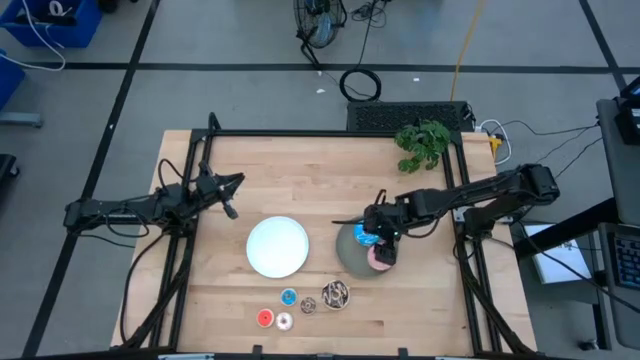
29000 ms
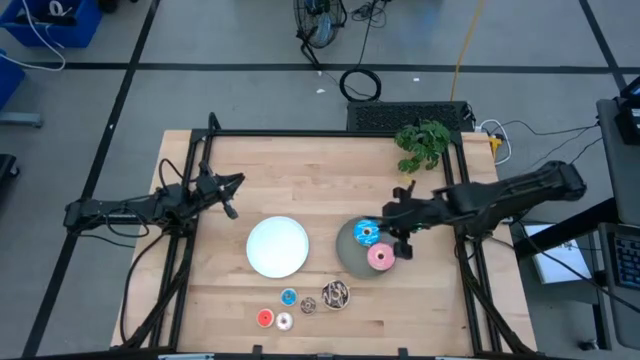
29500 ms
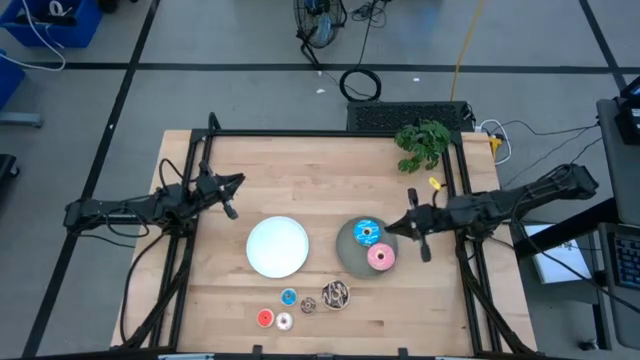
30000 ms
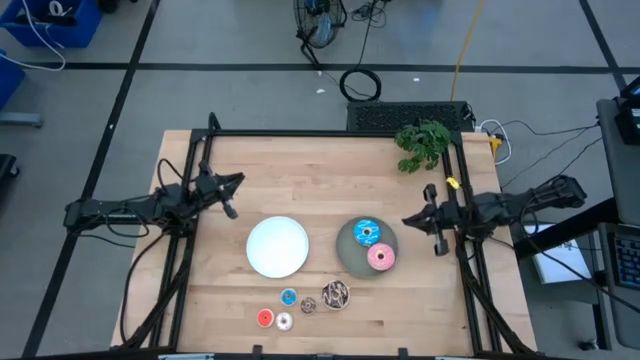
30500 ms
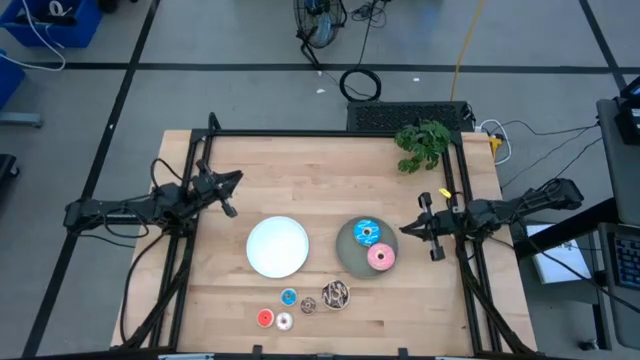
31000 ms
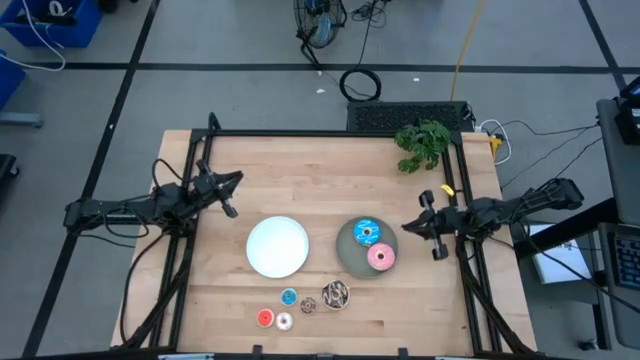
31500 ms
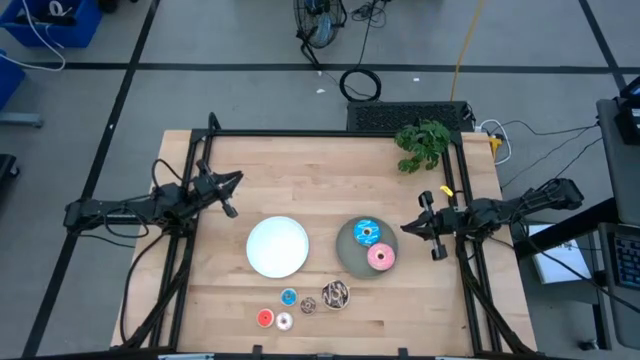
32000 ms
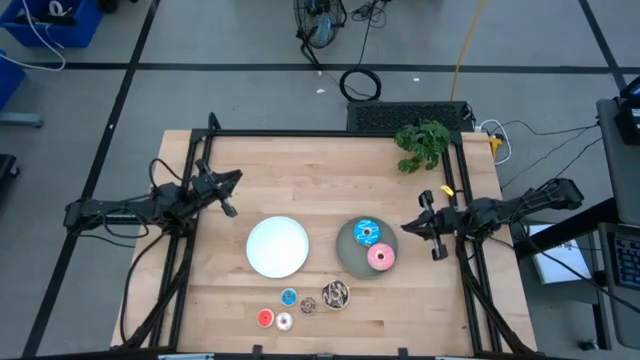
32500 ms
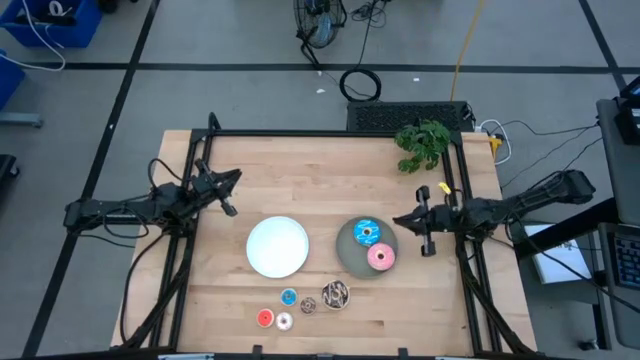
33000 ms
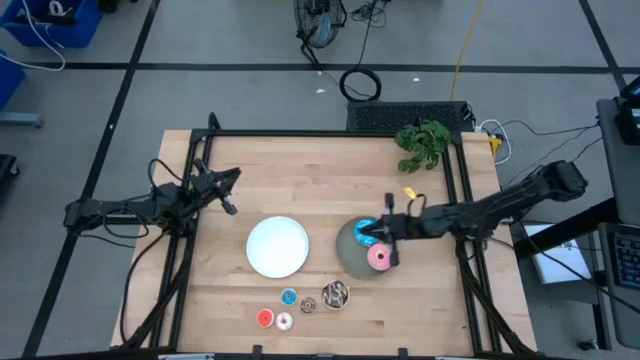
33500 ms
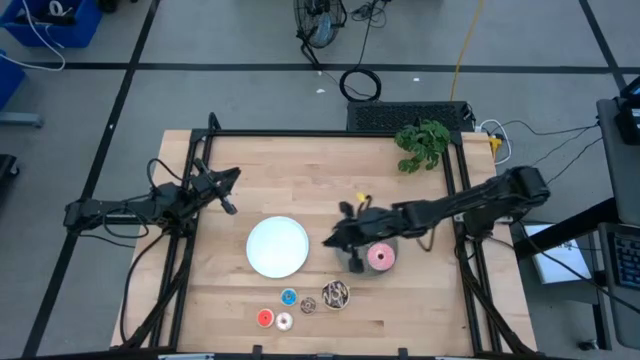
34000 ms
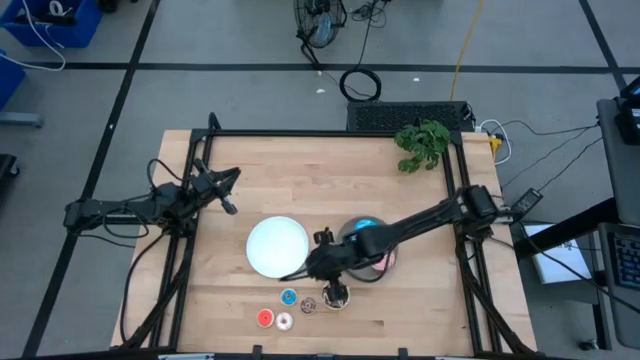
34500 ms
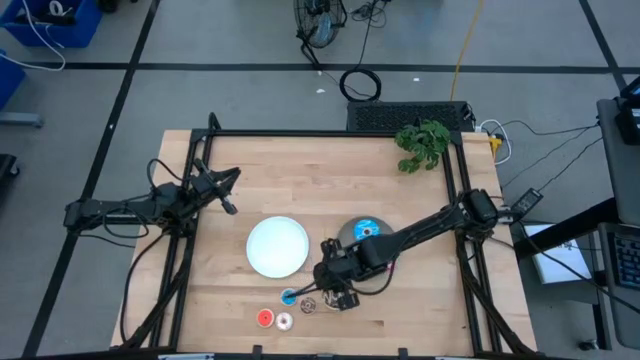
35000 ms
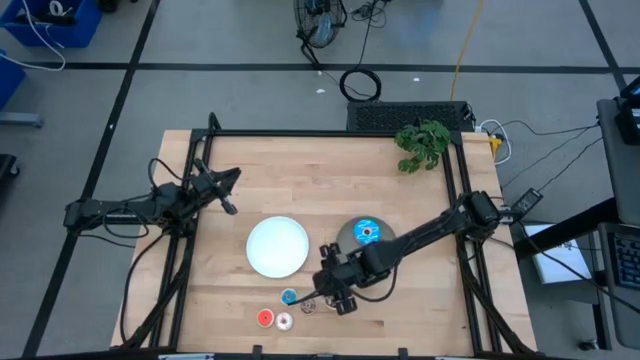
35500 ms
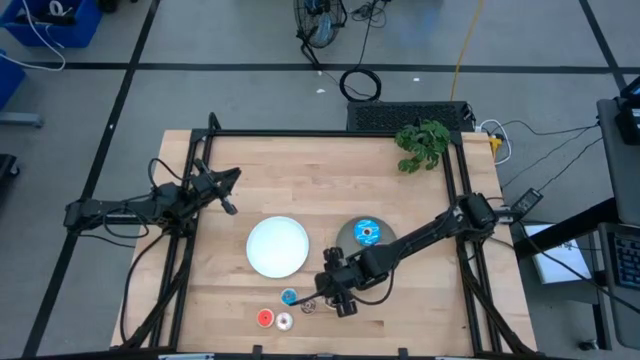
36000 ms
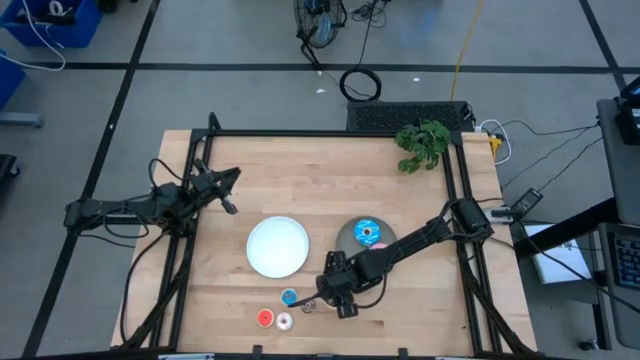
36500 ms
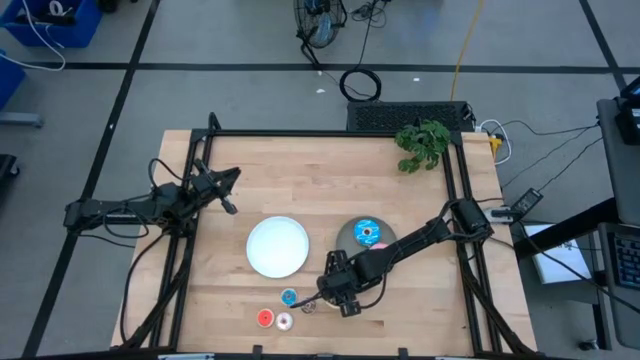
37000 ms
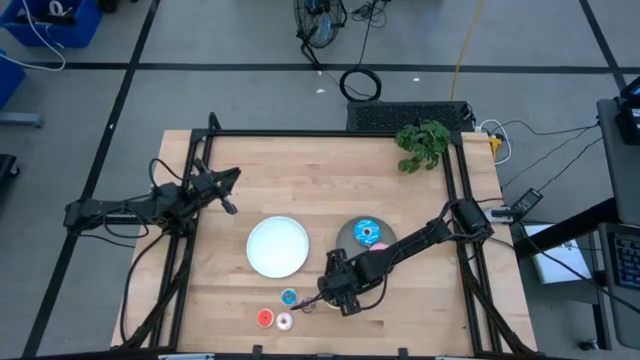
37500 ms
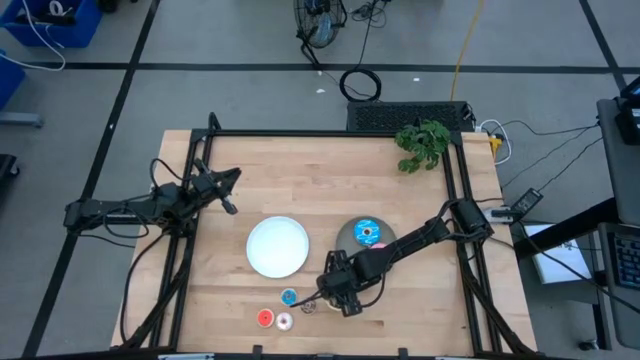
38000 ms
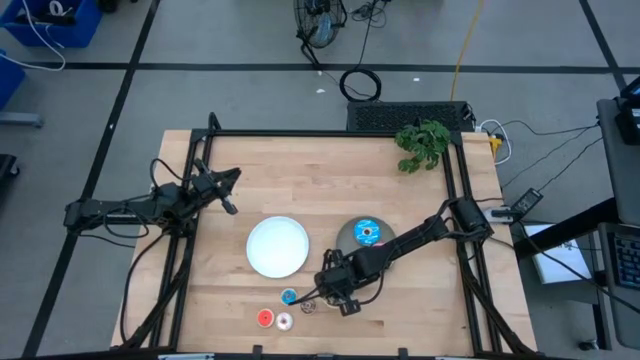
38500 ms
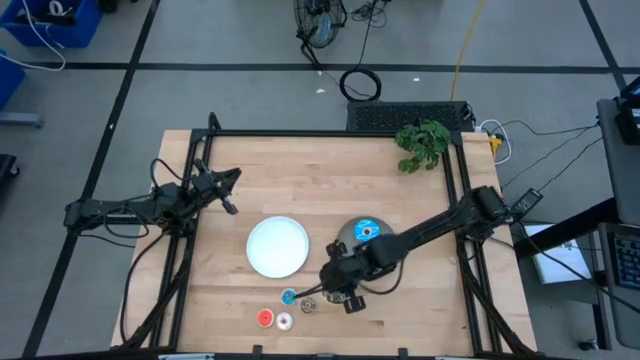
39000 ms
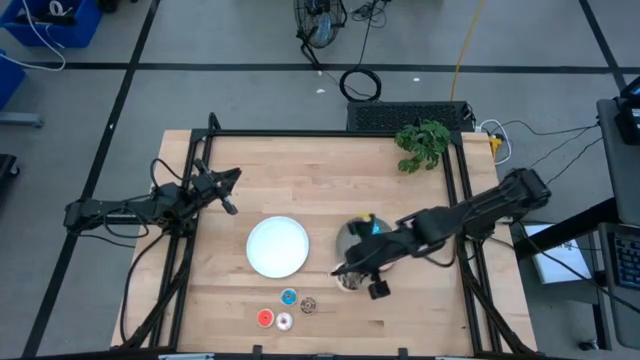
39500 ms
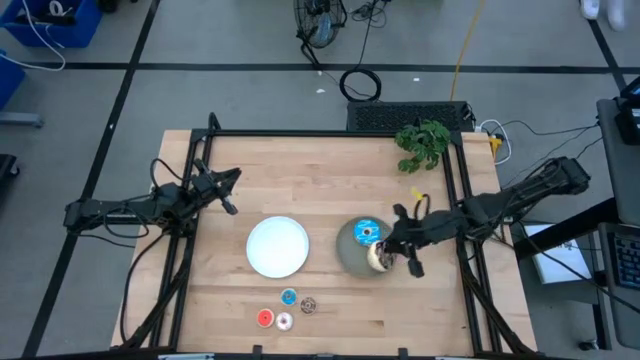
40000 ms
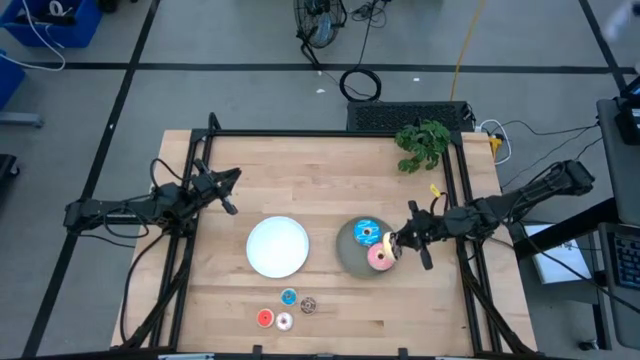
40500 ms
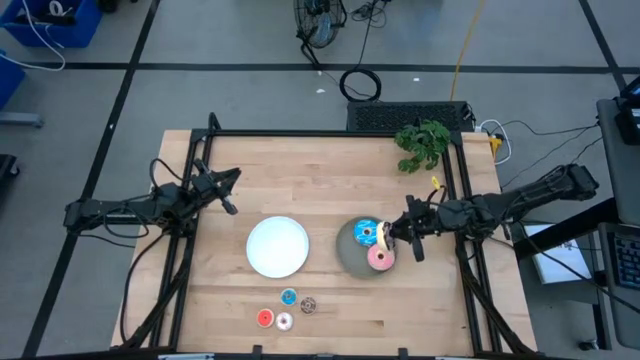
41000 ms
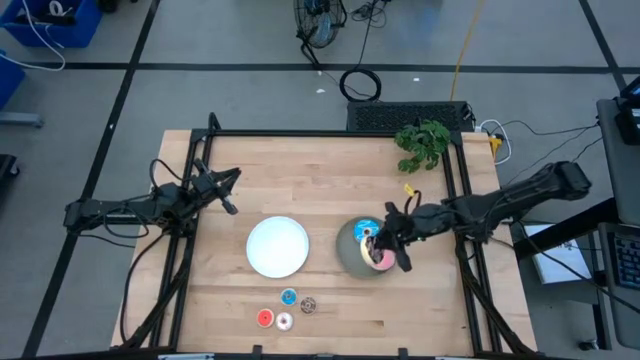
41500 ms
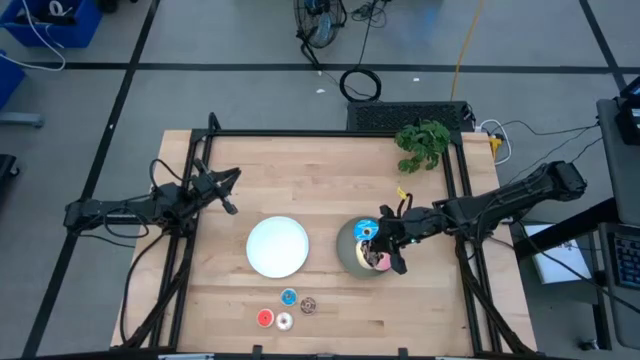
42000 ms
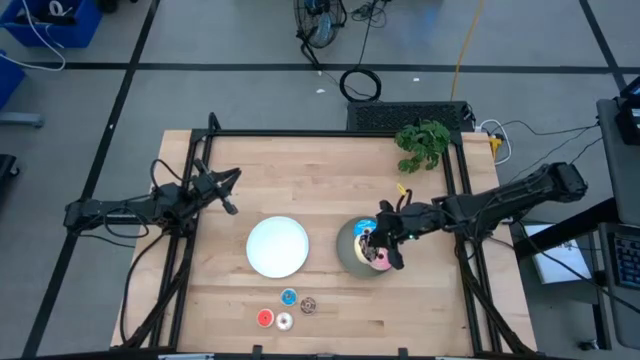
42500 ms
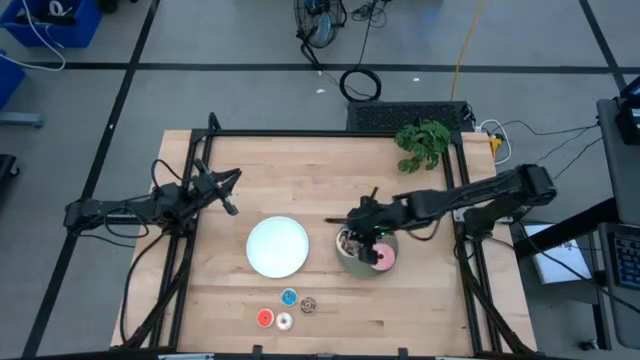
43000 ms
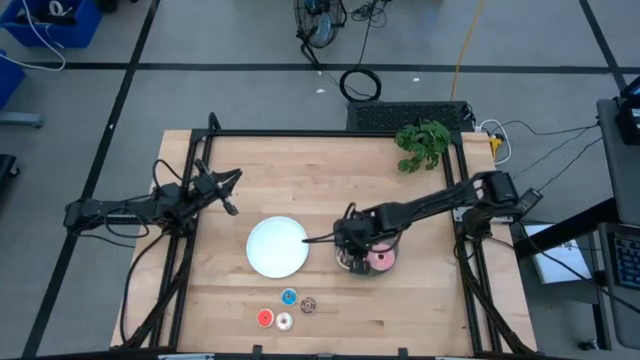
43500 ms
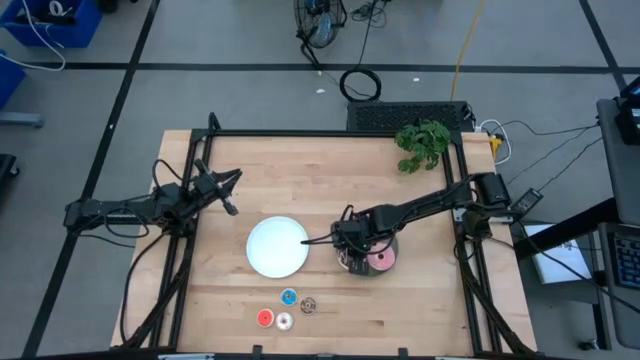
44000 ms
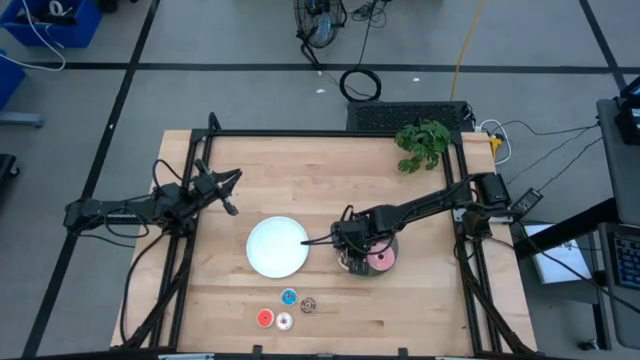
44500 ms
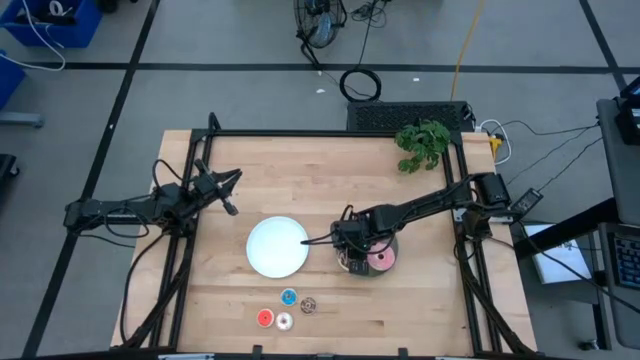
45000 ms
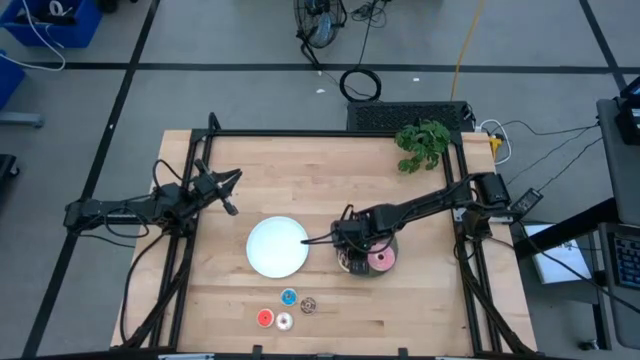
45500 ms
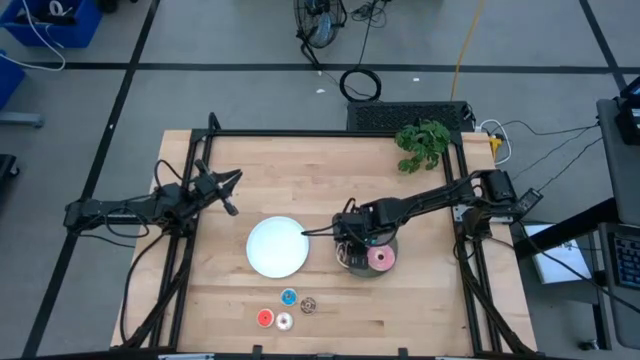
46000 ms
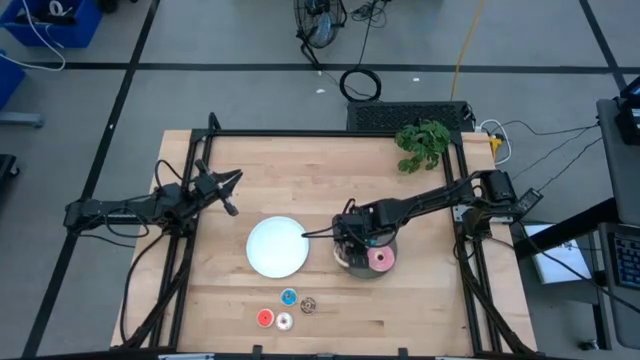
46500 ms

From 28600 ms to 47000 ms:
Task: Pick & Place donuts
Put the large black donut on the gray plate

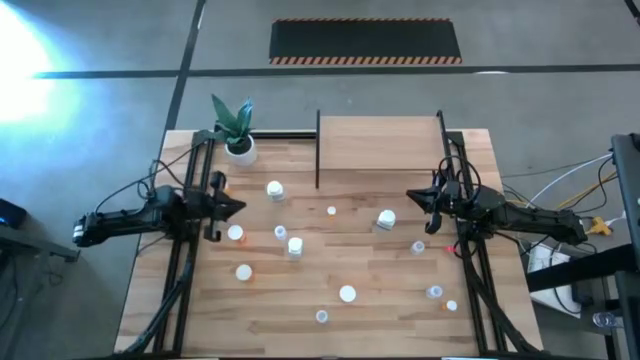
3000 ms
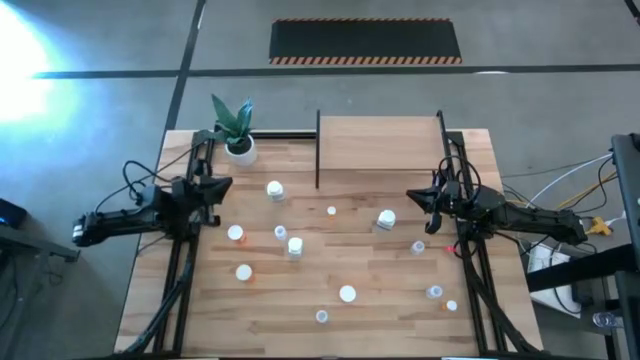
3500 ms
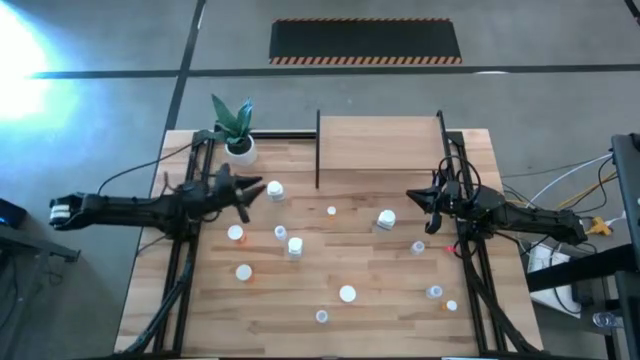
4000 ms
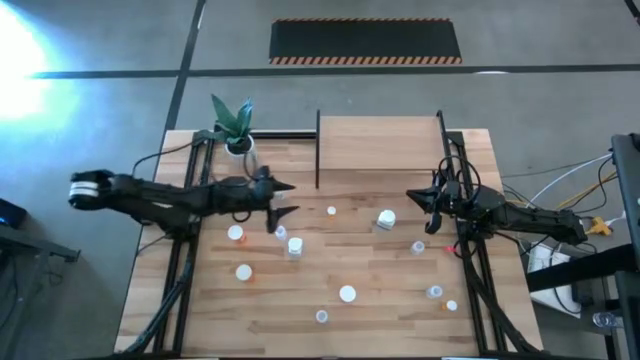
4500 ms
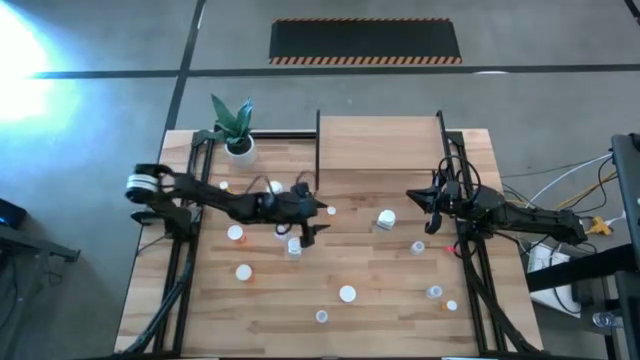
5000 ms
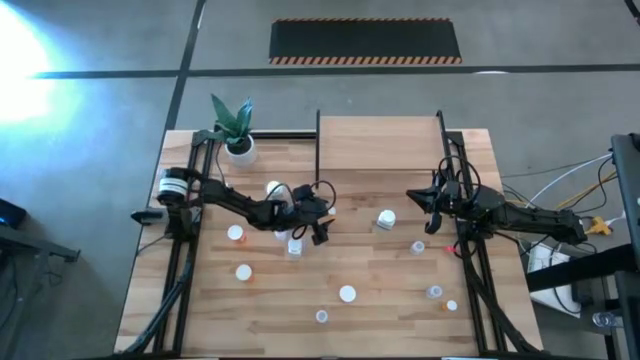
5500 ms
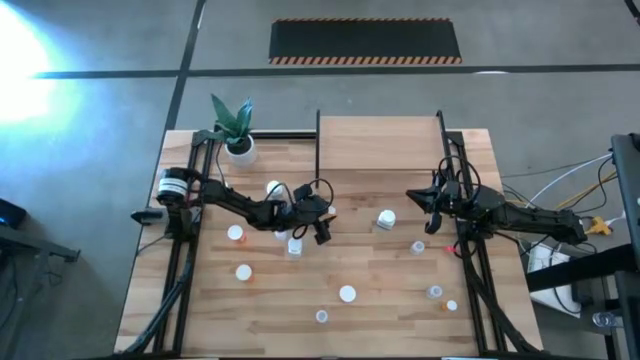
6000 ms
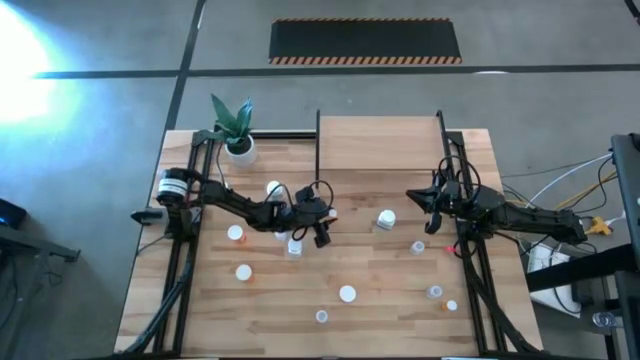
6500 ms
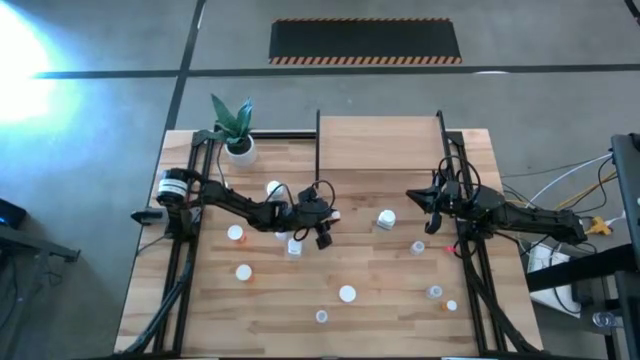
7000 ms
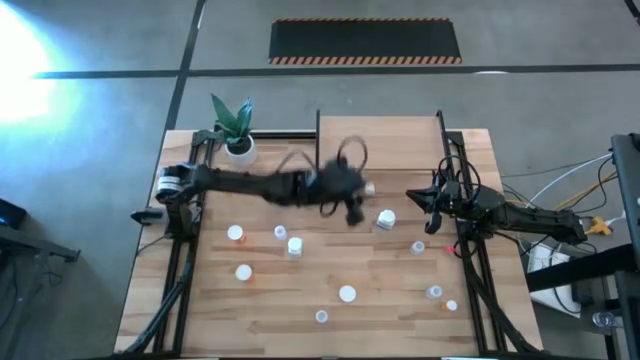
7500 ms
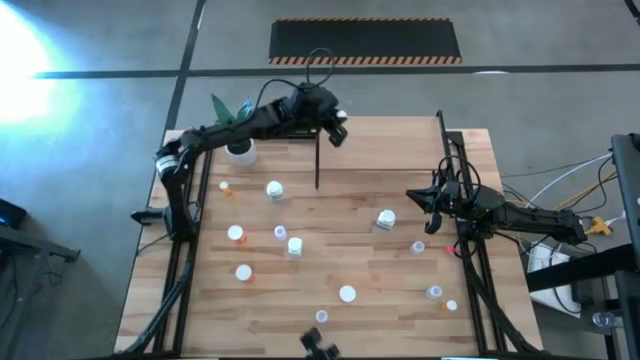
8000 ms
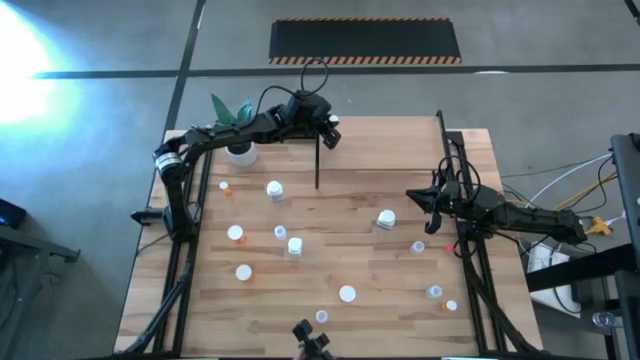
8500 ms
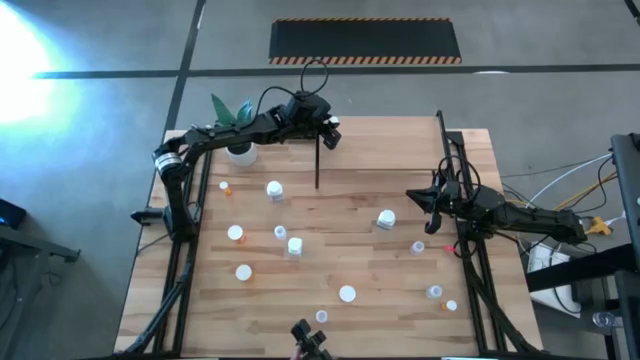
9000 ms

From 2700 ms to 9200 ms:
Task: Pick and place medicine bottles onto shelf by color
Put the small orange pill bottle on the shelf
